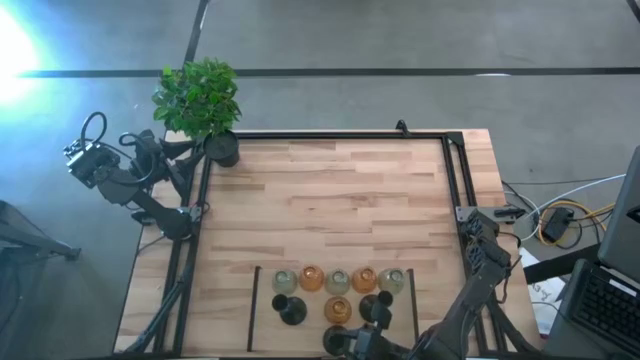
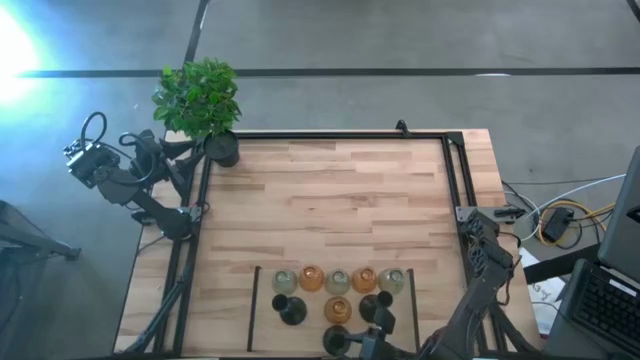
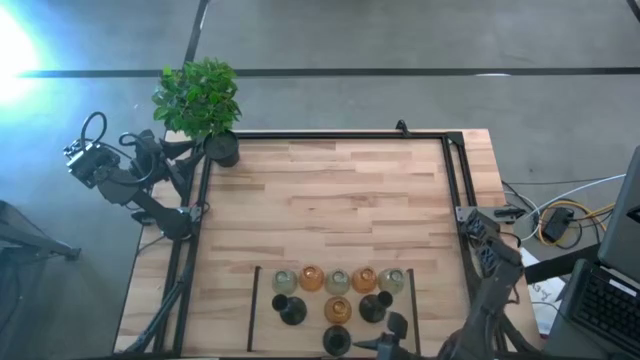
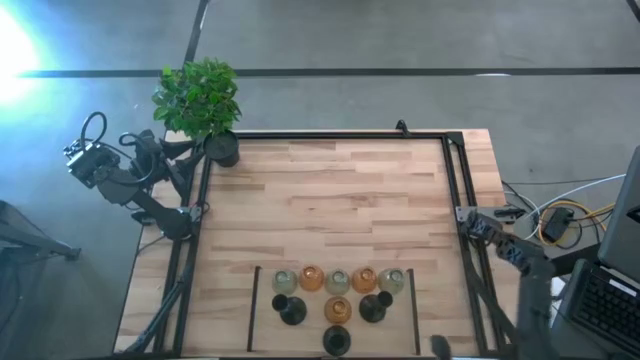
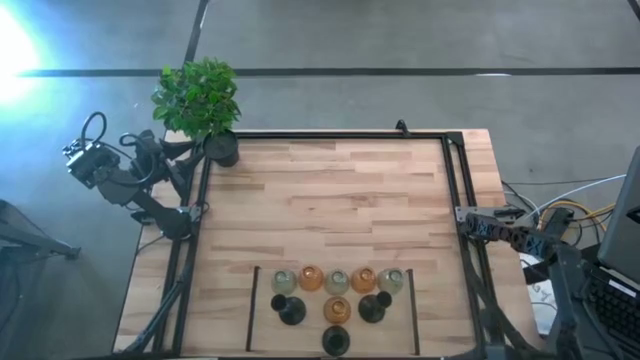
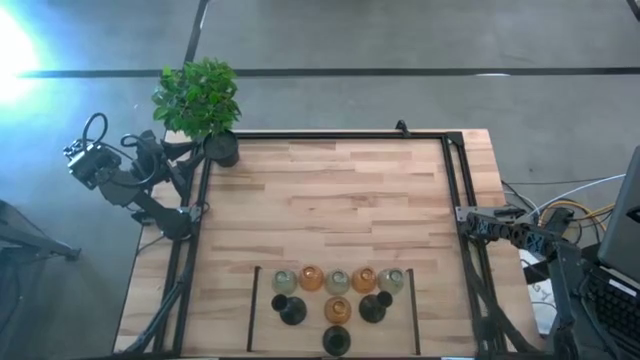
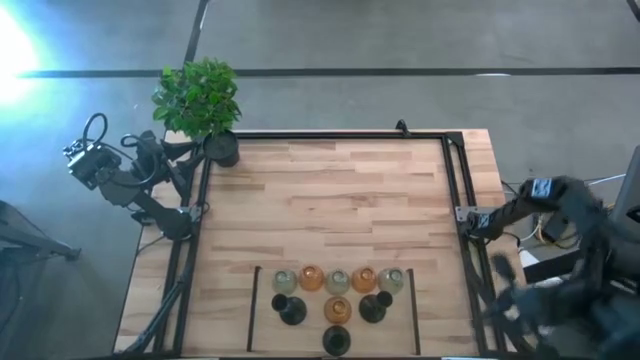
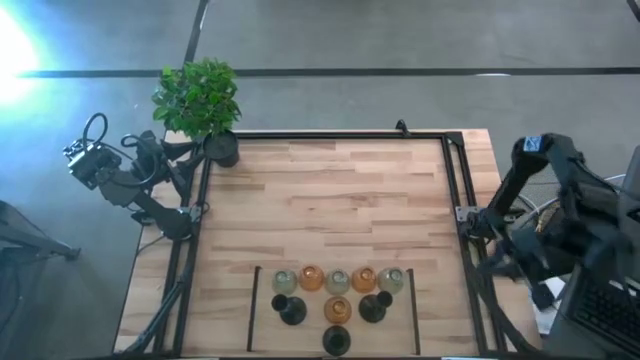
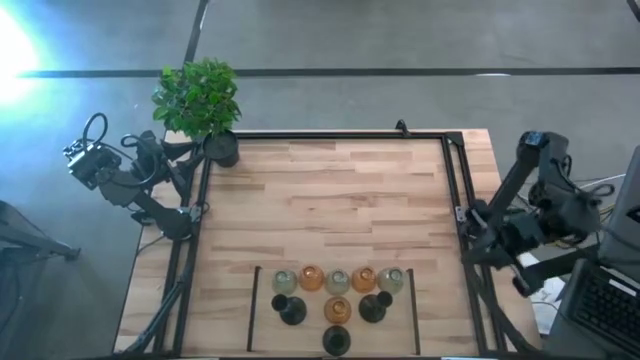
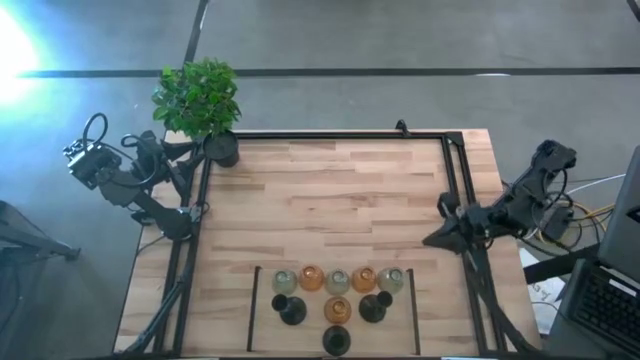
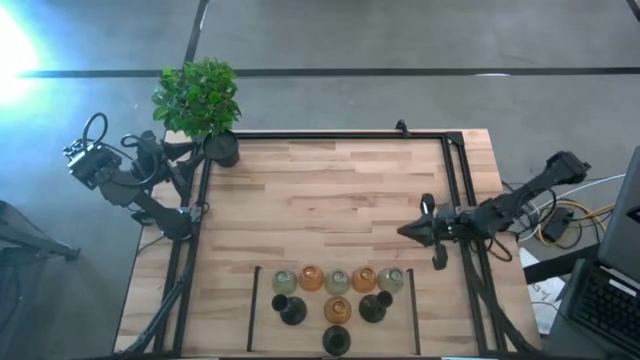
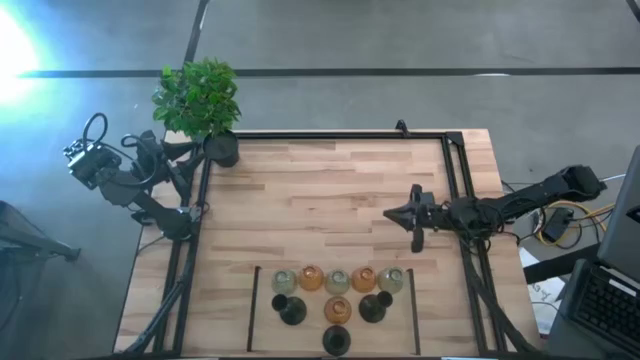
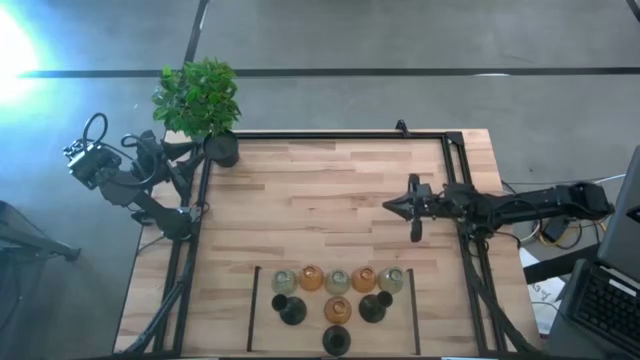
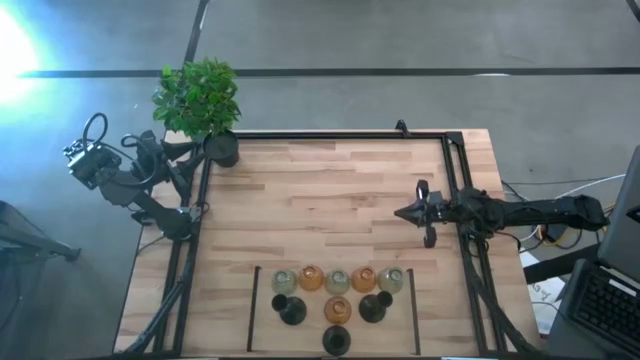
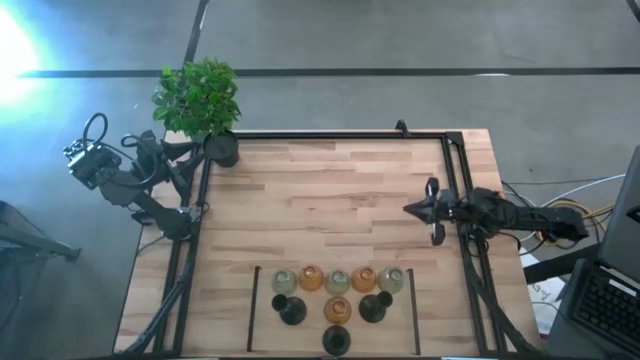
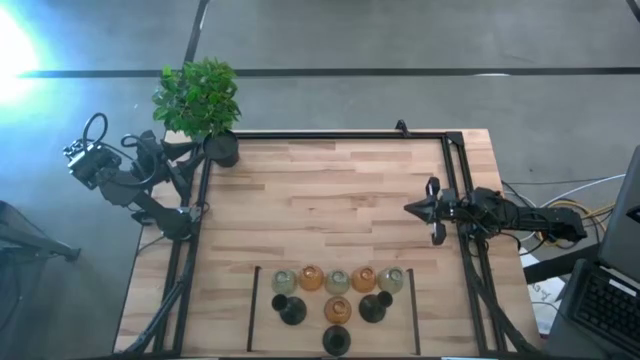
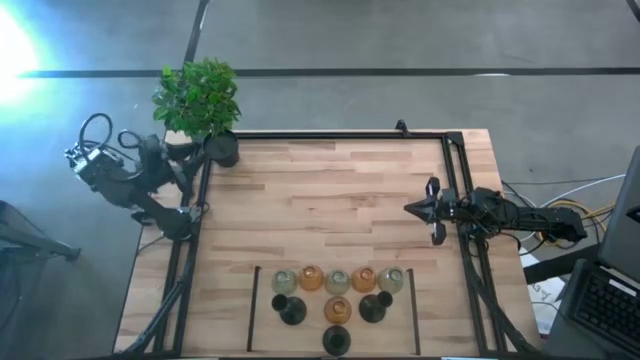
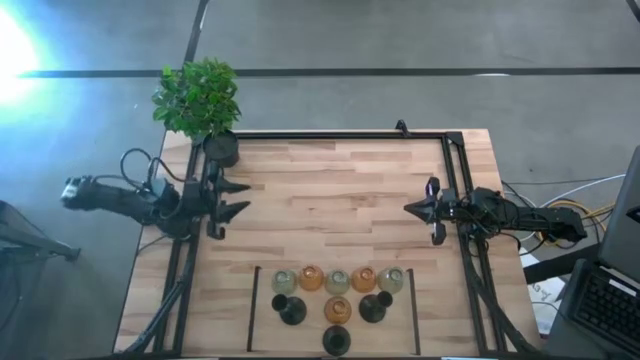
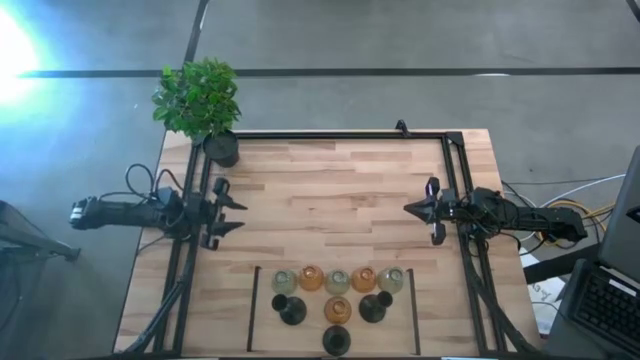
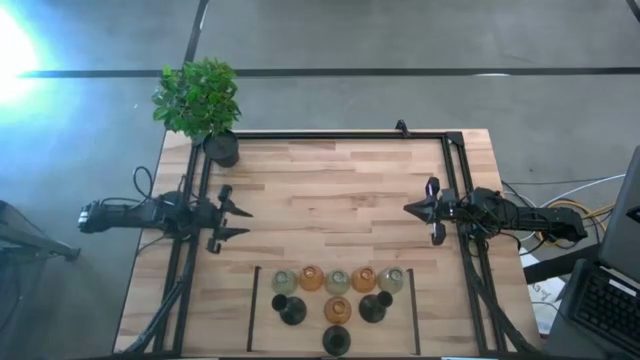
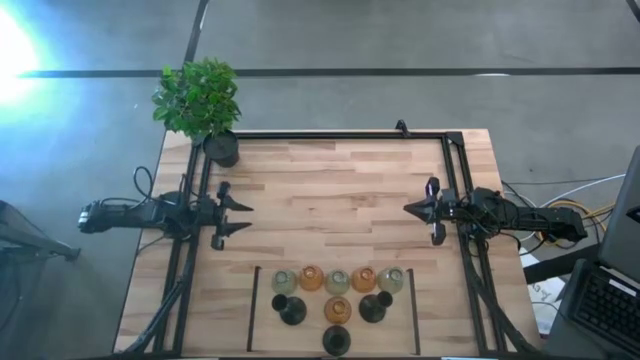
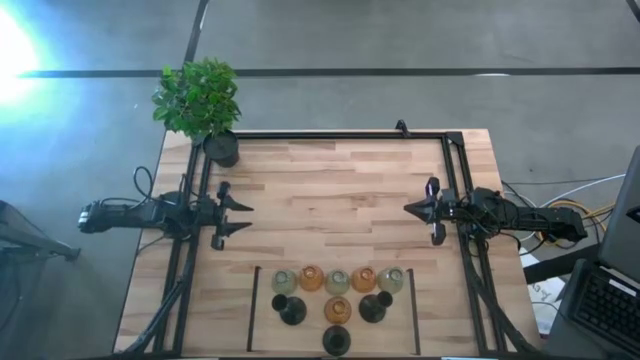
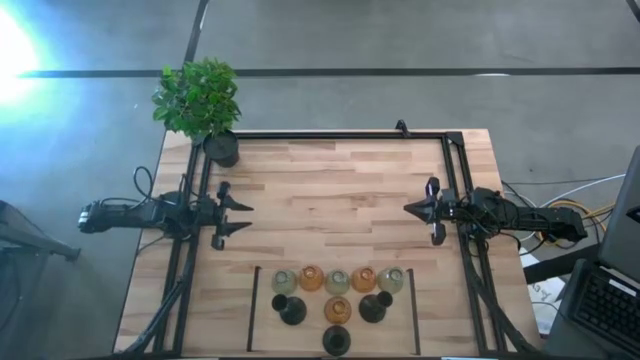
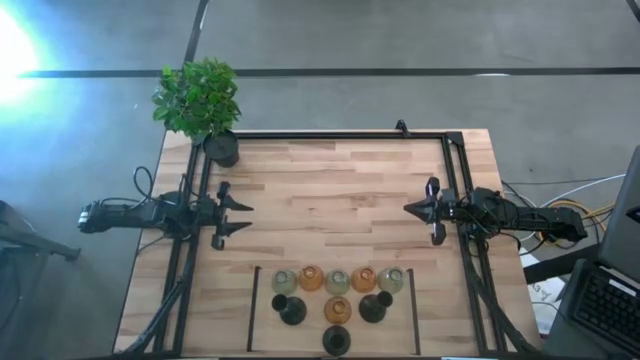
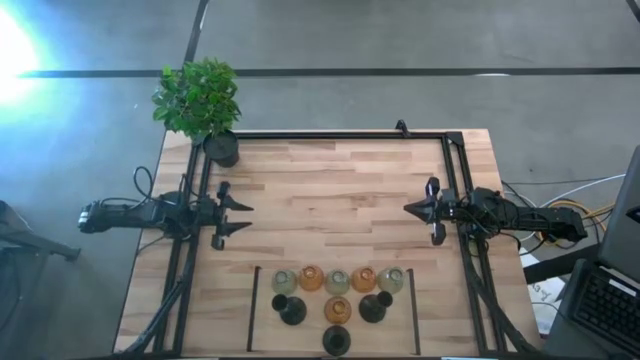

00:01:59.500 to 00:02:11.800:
Task: Pick & Place candle stick holders
Return to Home Position

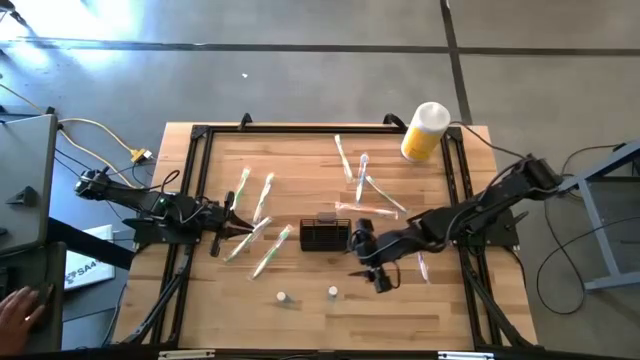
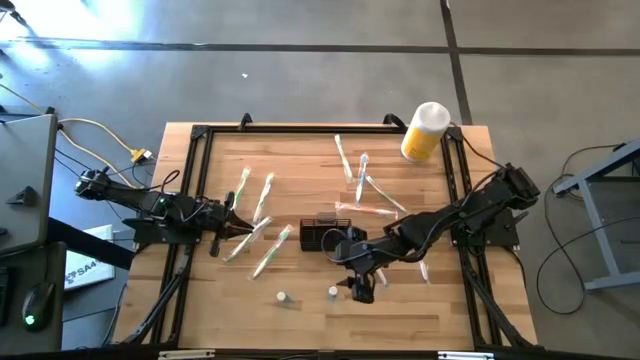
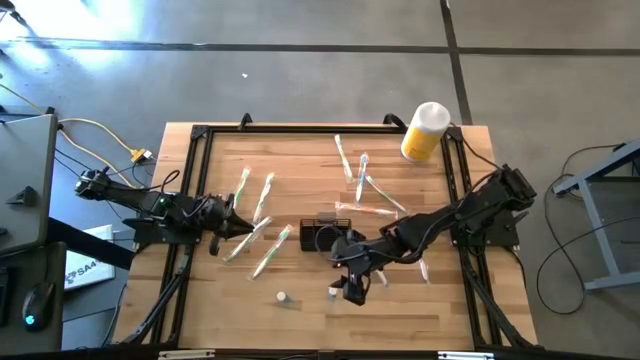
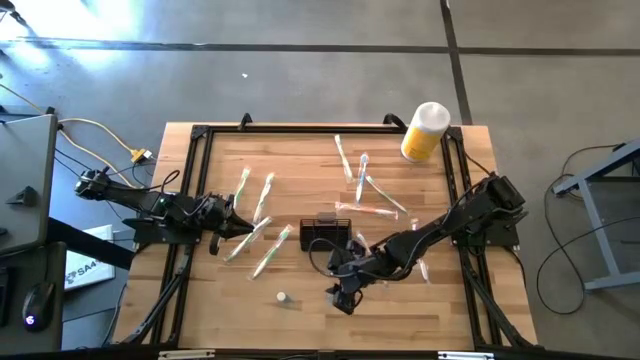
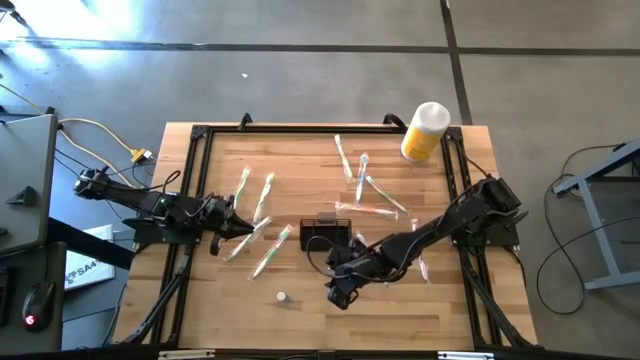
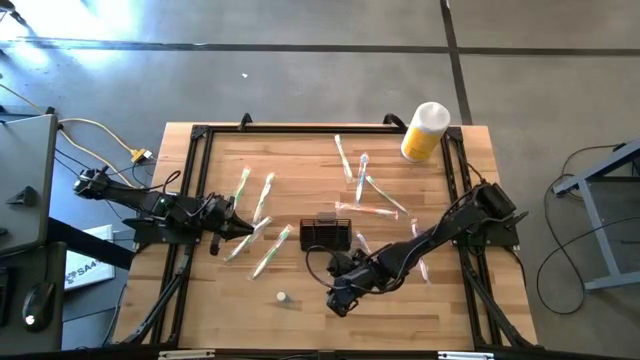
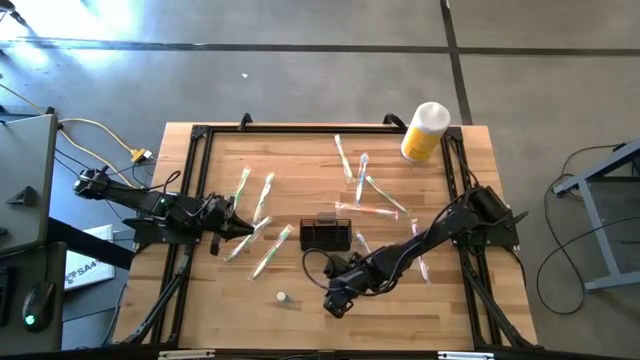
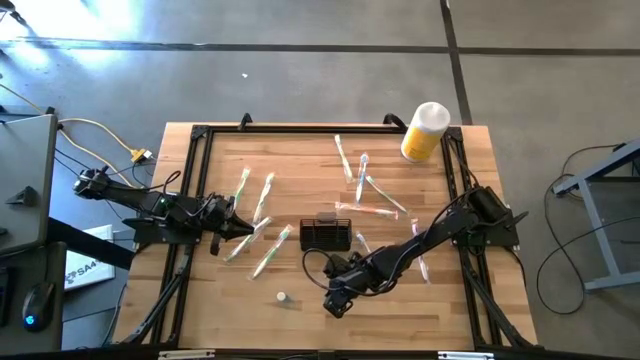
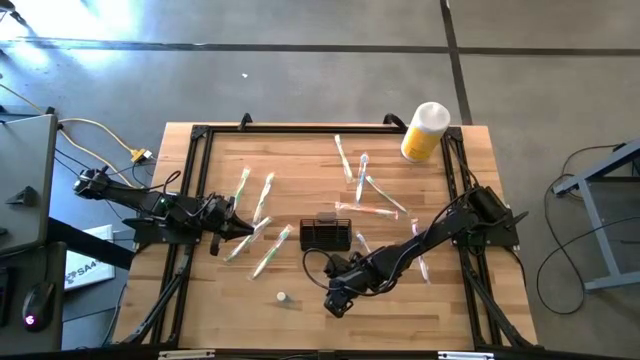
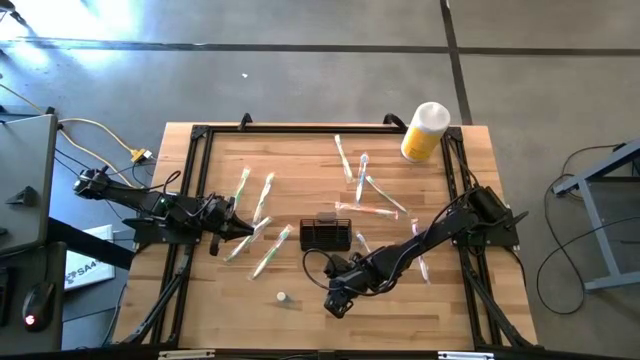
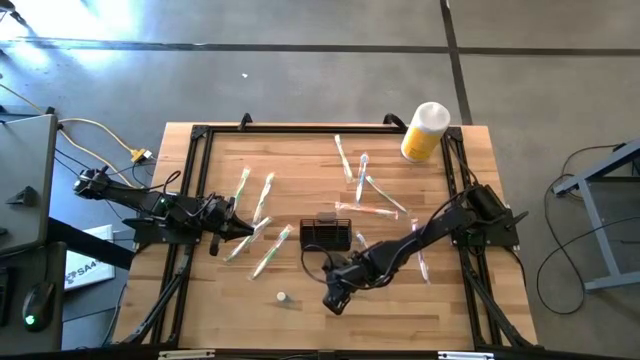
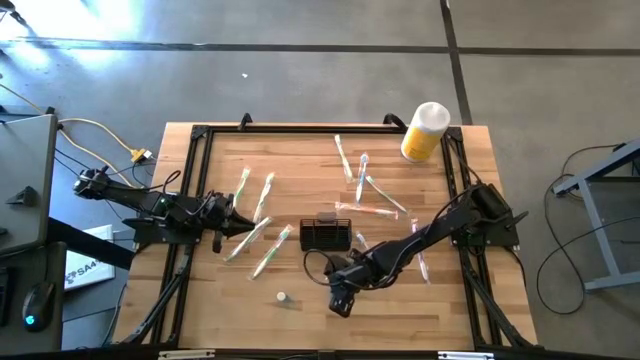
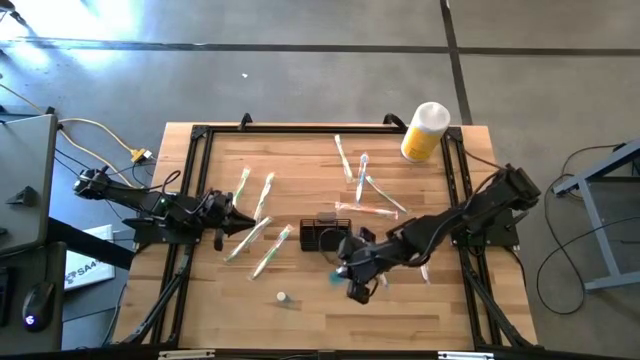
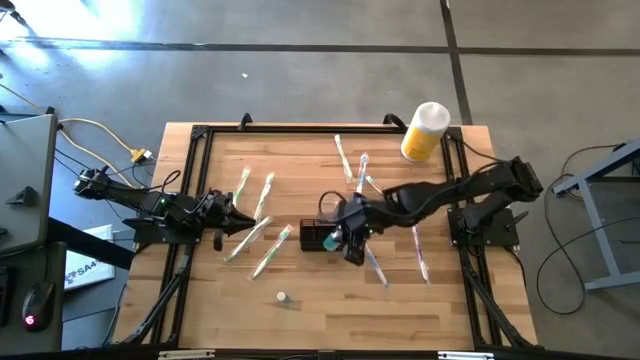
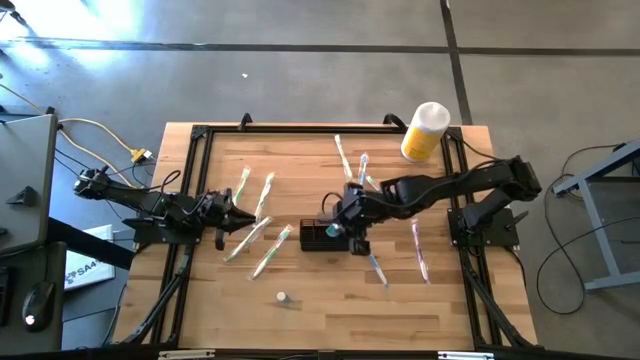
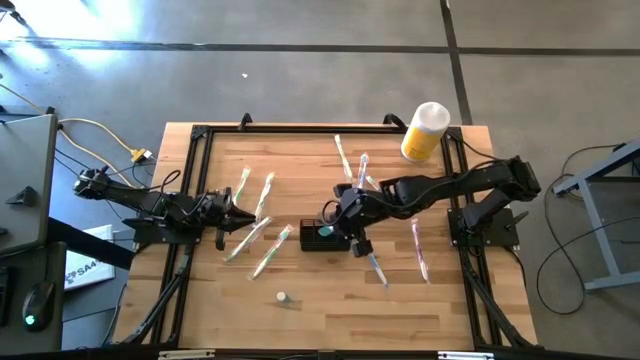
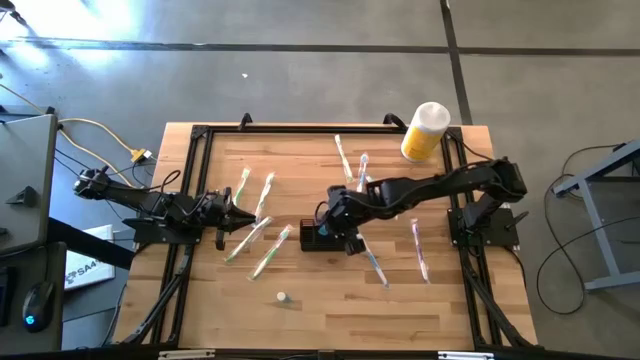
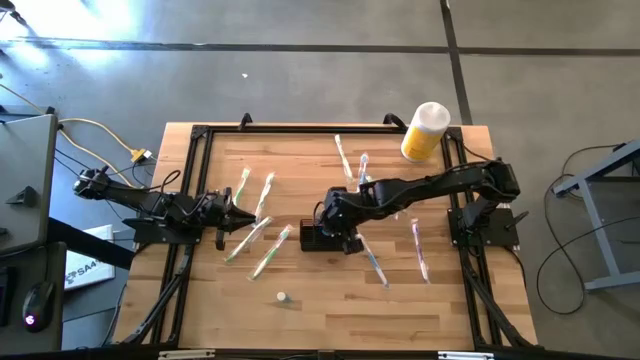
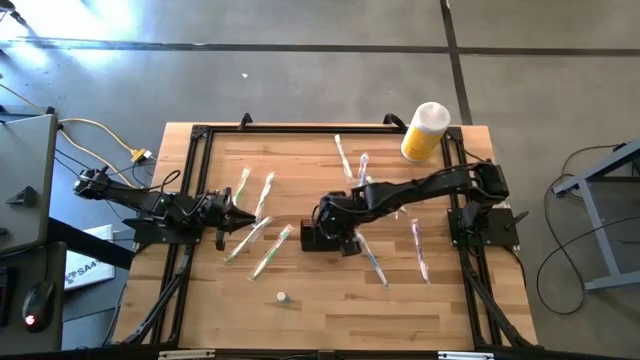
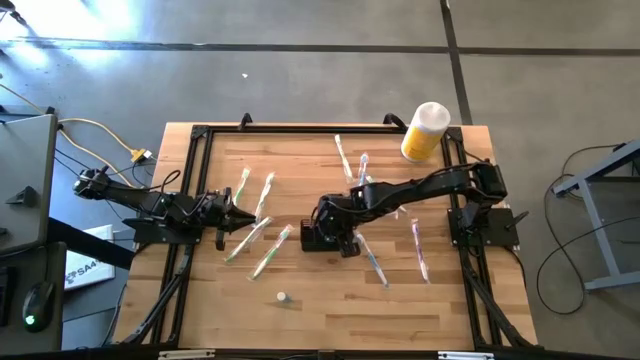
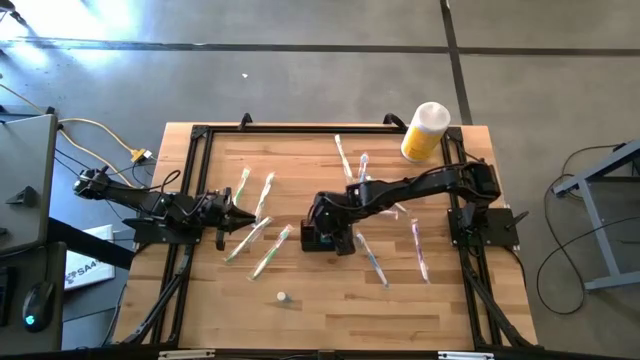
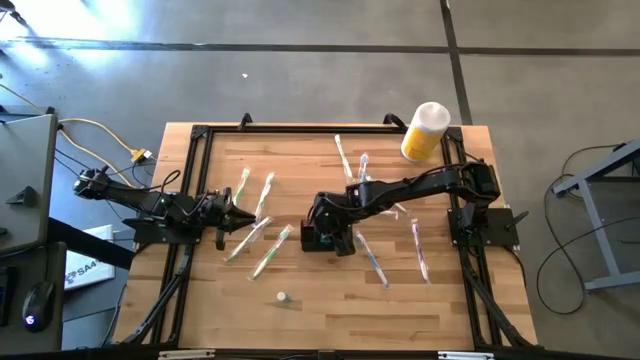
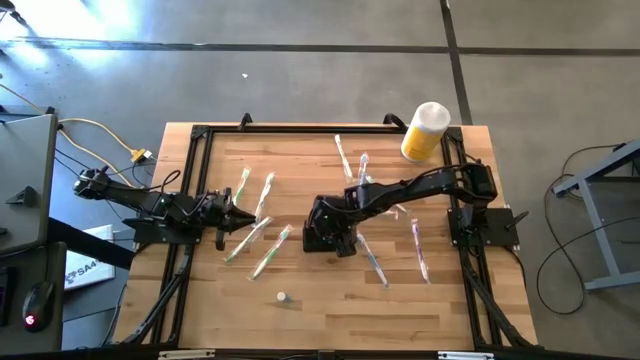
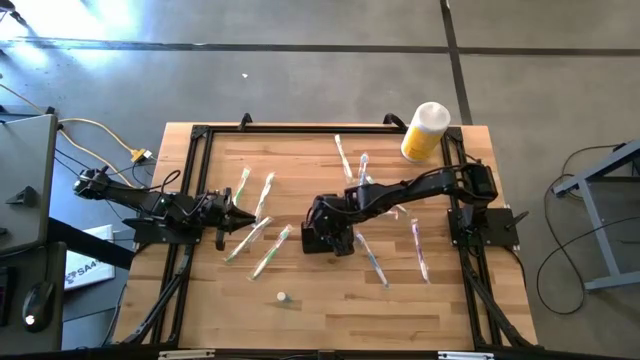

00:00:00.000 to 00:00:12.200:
Task: Pick & Place toothbrushing station
Put the right mouthwash bottle into the wire organizer
